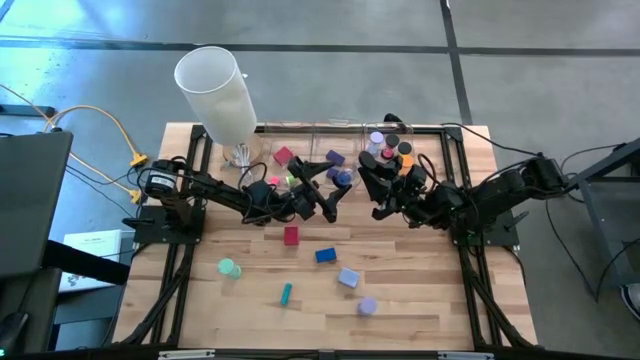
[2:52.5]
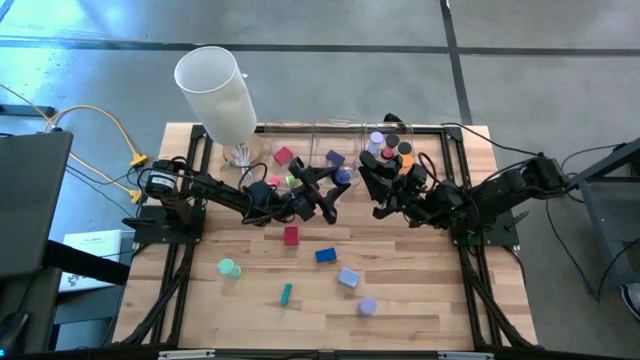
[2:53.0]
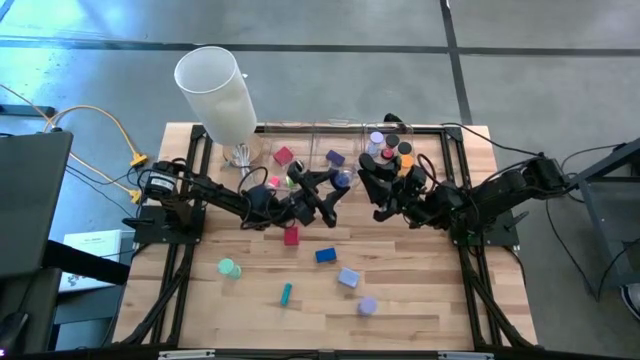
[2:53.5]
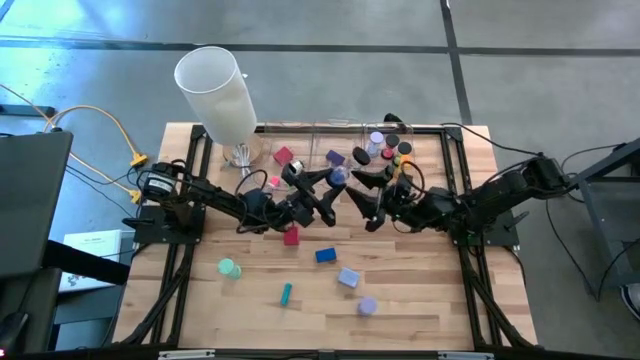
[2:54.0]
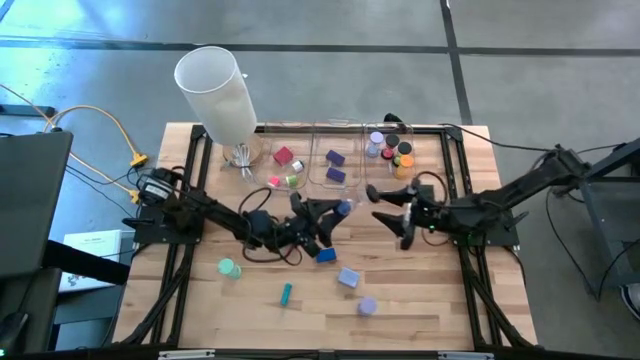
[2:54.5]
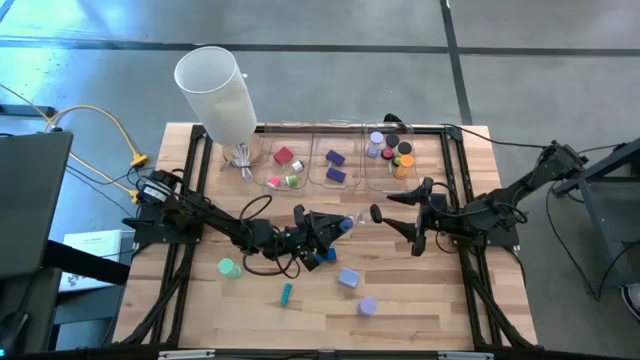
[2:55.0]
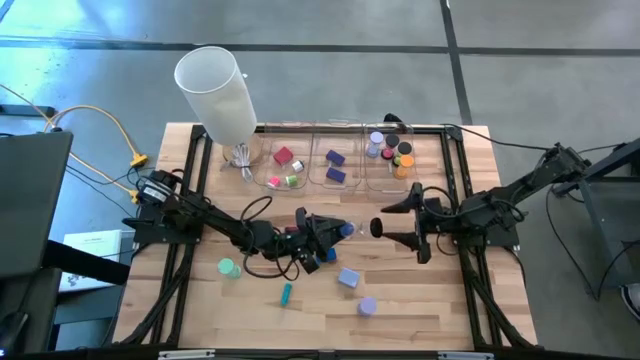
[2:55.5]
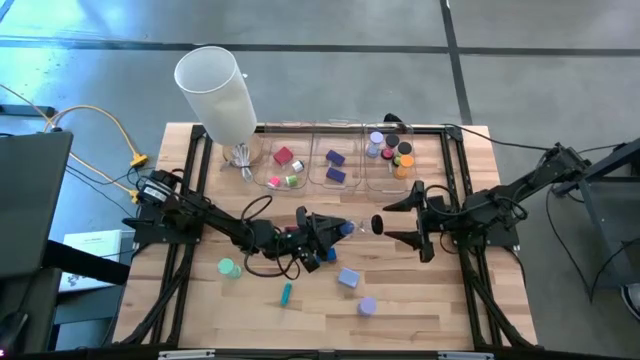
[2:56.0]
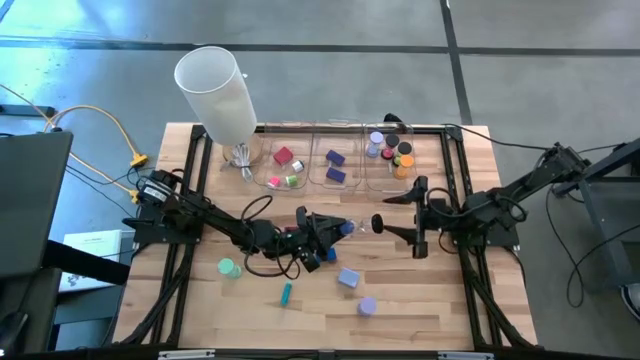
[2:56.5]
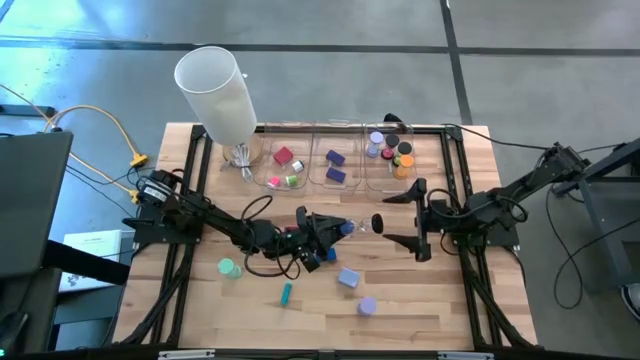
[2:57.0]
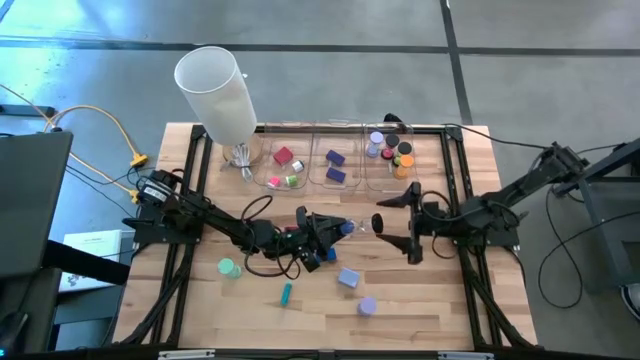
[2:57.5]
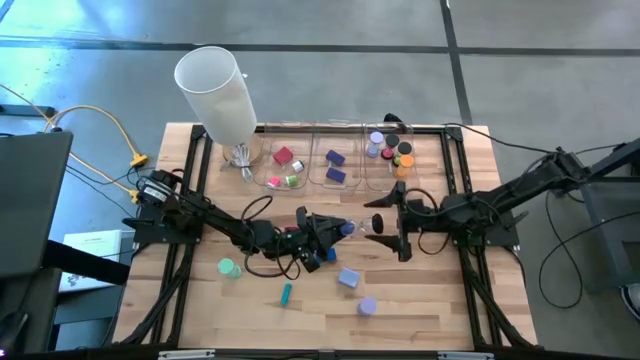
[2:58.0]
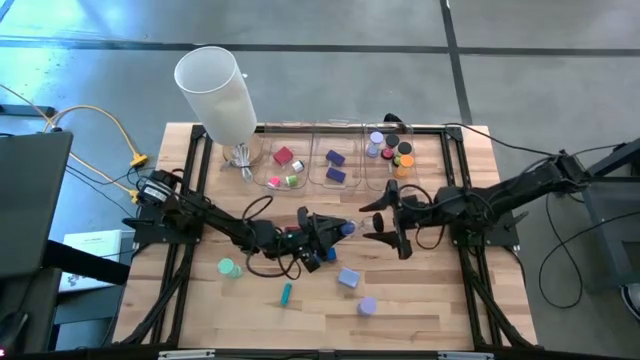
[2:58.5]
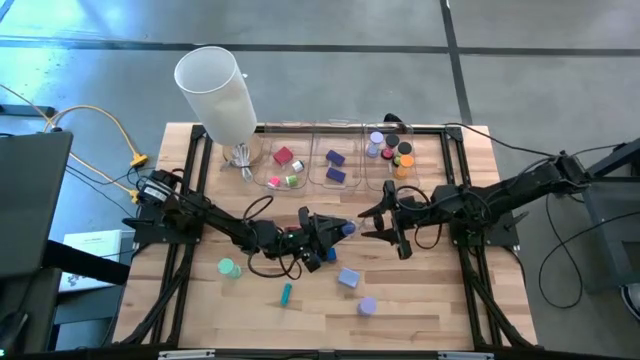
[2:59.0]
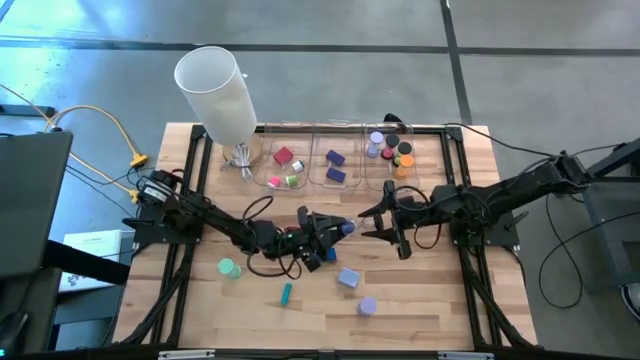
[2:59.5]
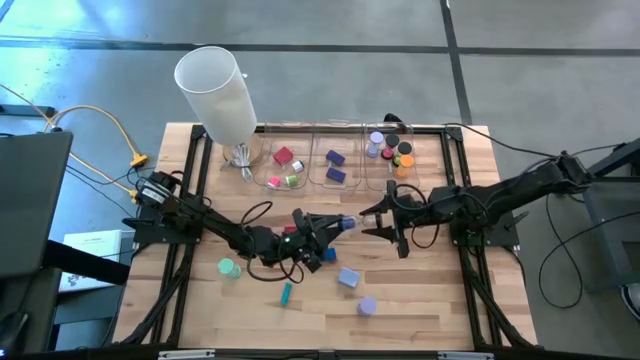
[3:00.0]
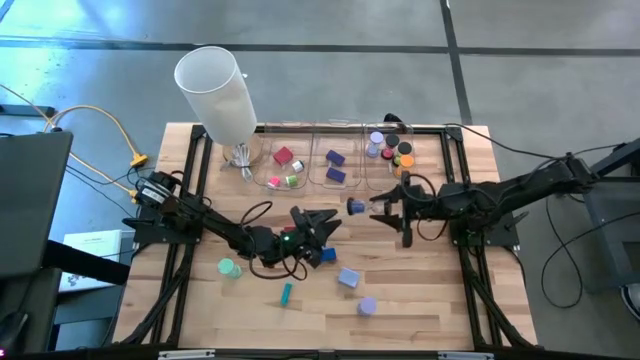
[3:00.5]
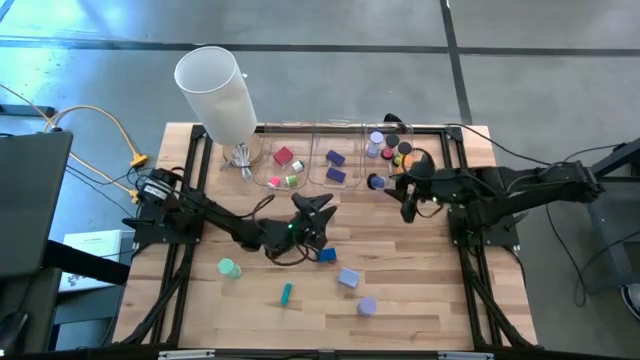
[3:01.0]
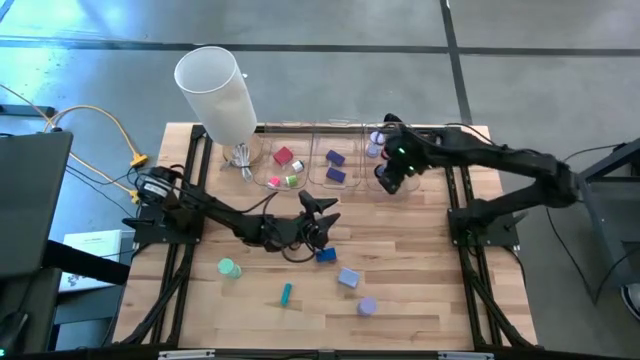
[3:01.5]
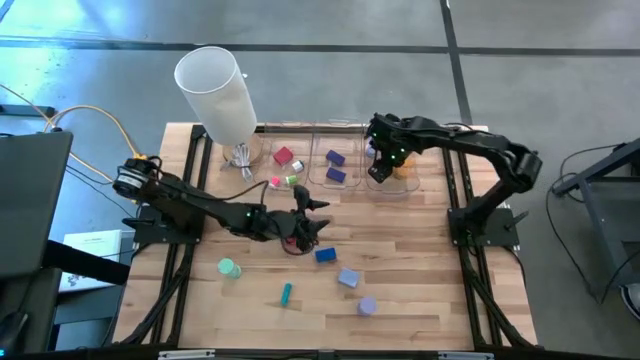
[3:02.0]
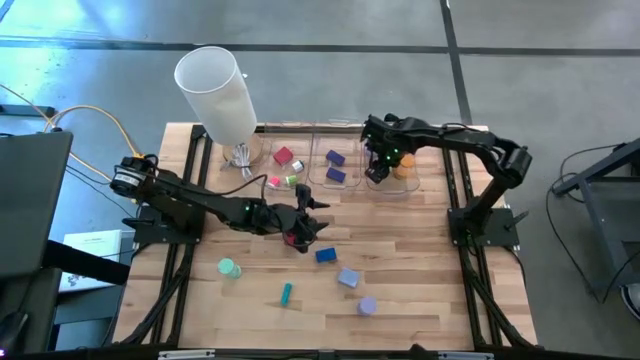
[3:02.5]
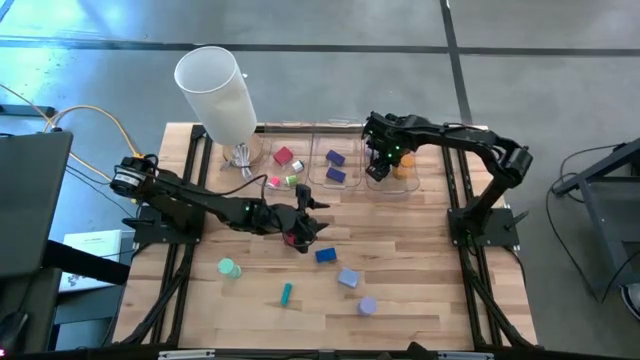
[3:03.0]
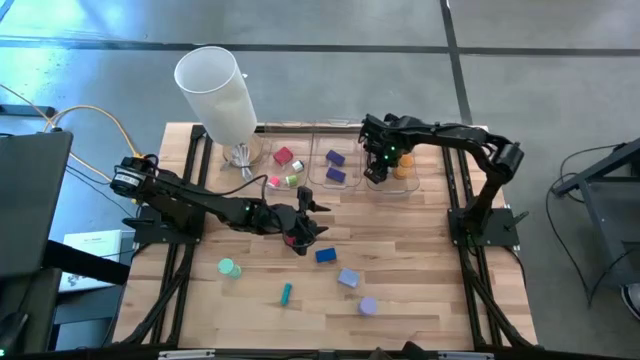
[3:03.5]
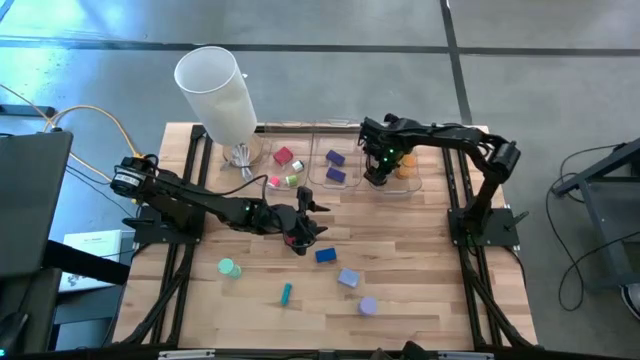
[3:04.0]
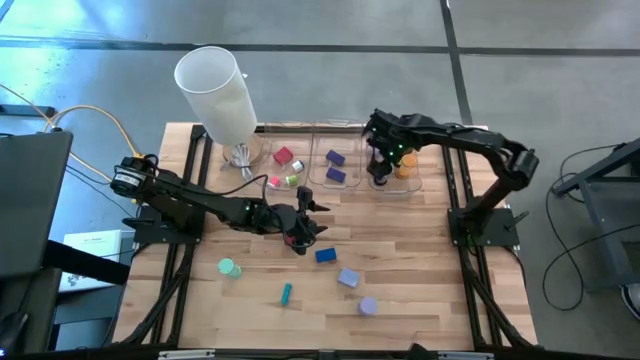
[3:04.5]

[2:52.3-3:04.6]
Task: Pick & Place Office items
Put the blue hourglass into the right transparent bin

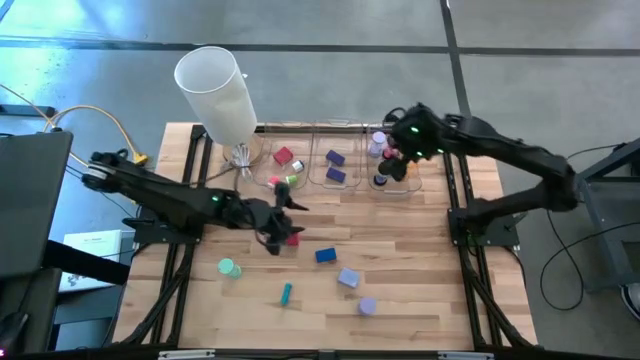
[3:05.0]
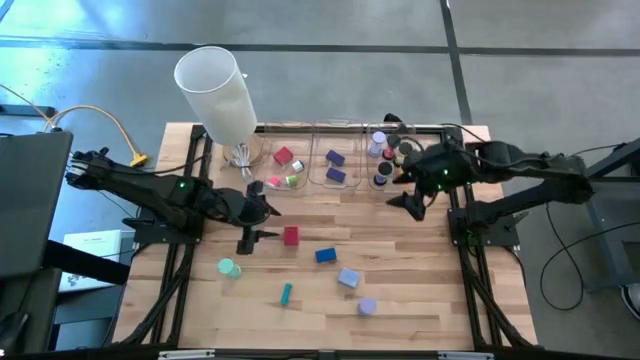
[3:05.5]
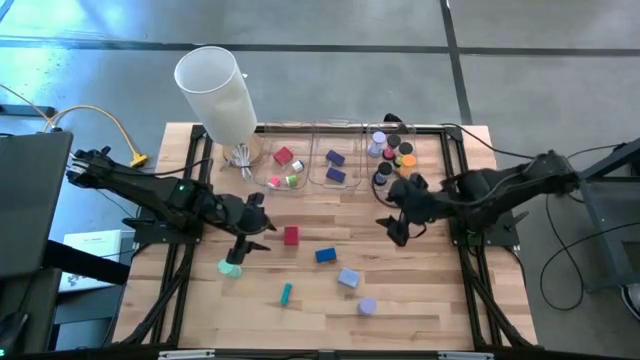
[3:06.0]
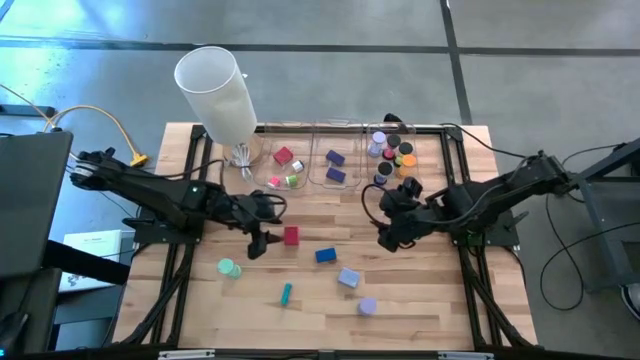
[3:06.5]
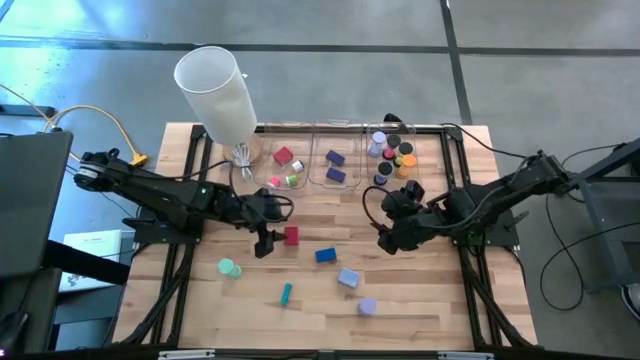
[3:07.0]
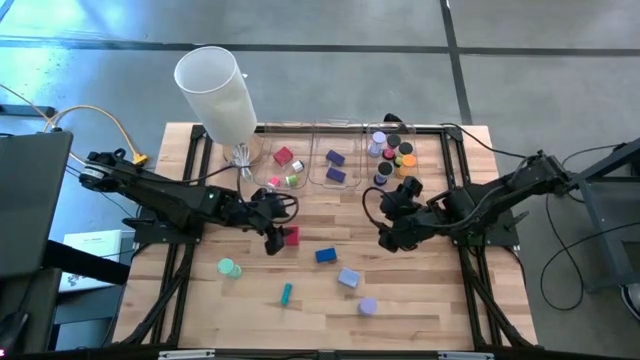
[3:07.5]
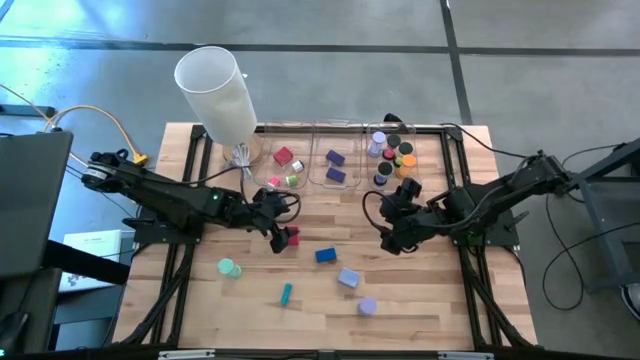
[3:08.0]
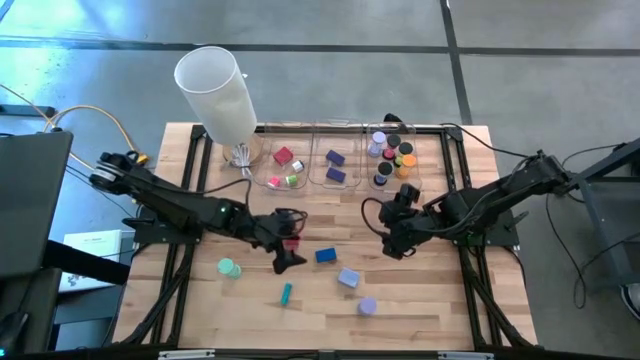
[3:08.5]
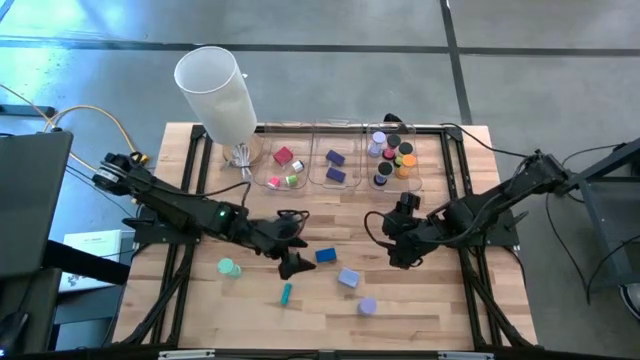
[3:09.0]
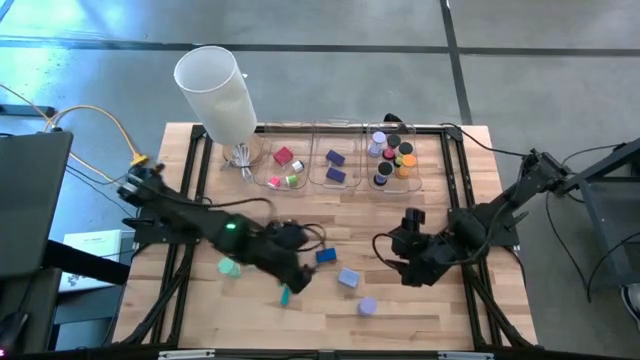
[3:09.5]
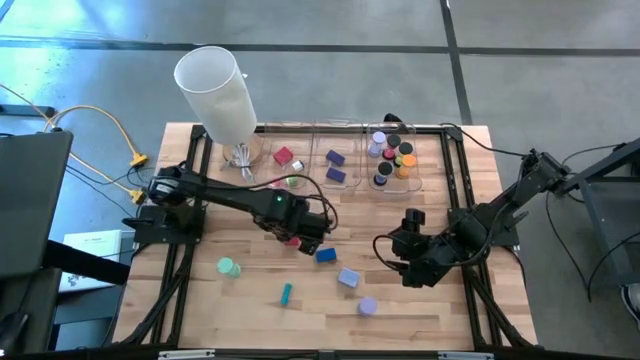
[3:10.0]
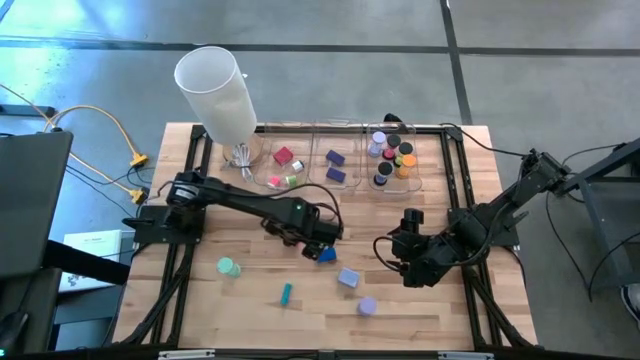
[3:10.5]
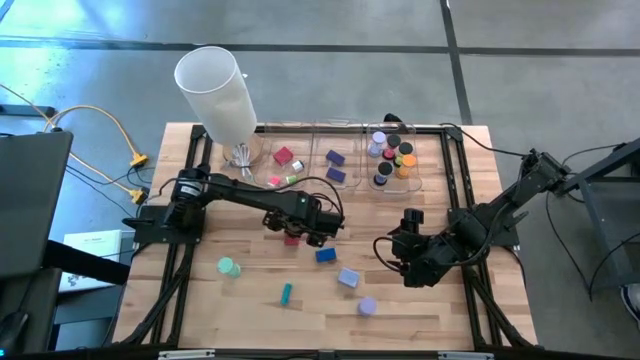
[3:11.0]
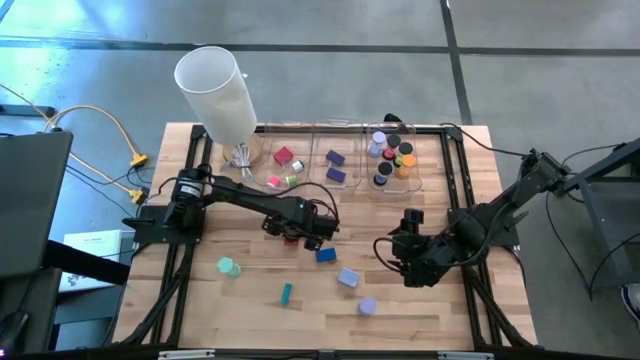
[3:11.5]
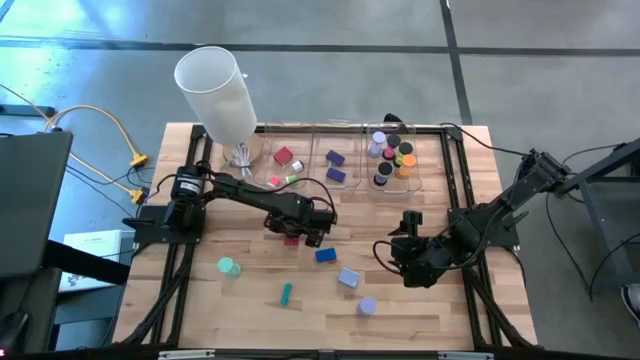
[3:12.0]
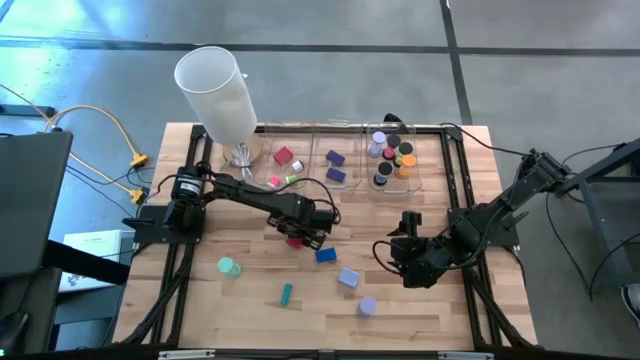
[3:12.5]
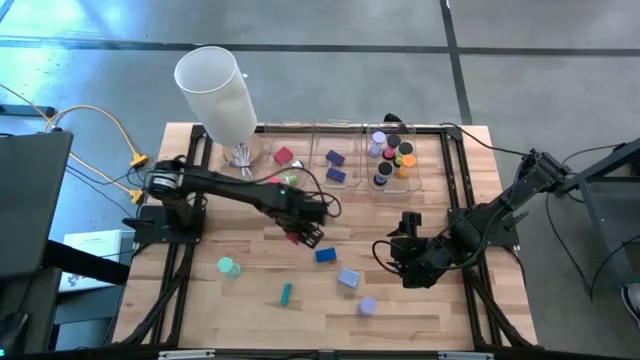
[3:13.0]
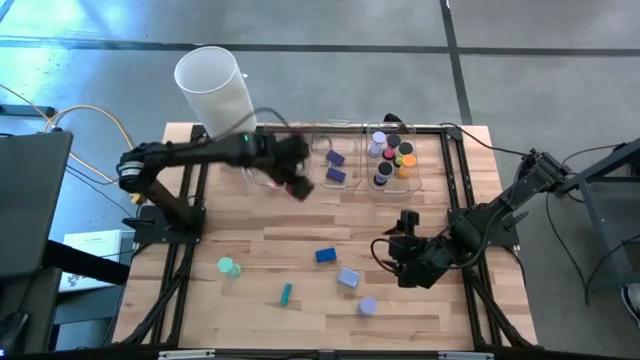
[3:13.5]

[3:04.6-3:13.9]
Put the red charger adapter into the left transparent bin
